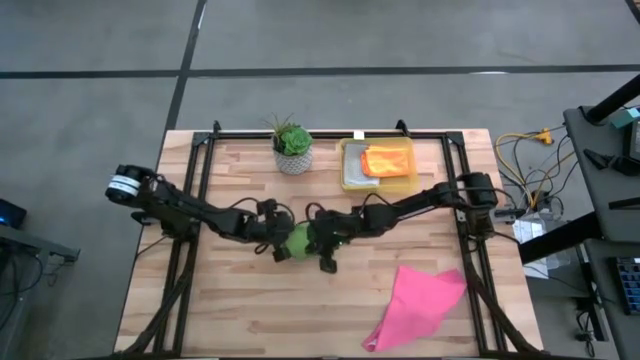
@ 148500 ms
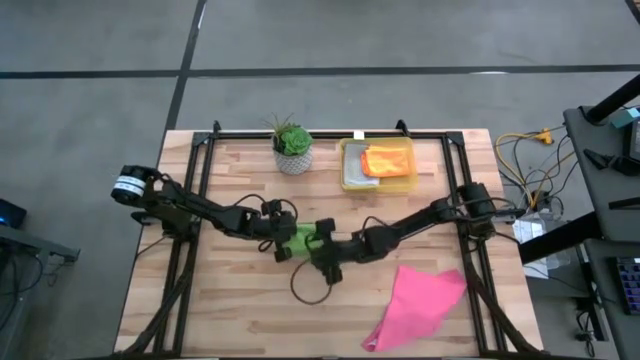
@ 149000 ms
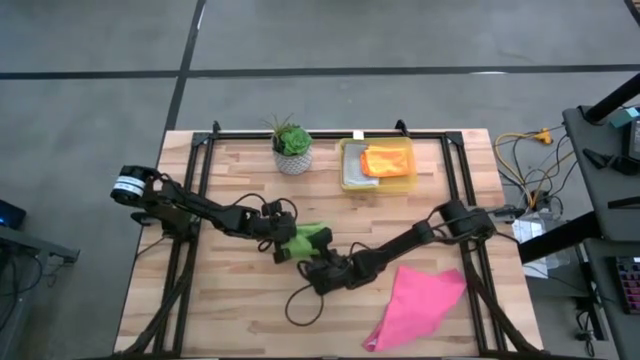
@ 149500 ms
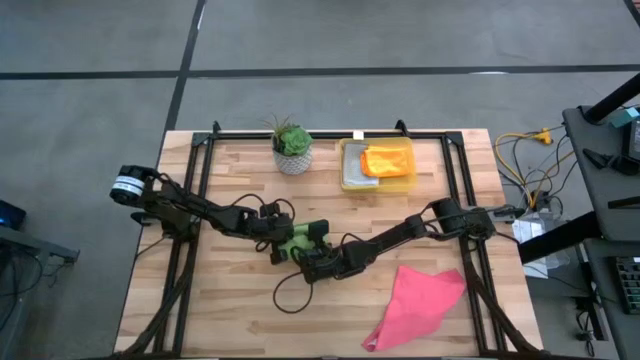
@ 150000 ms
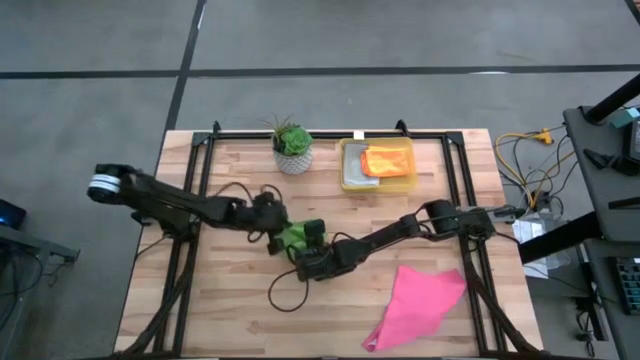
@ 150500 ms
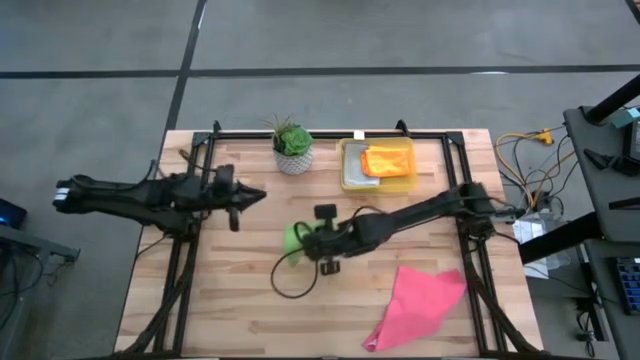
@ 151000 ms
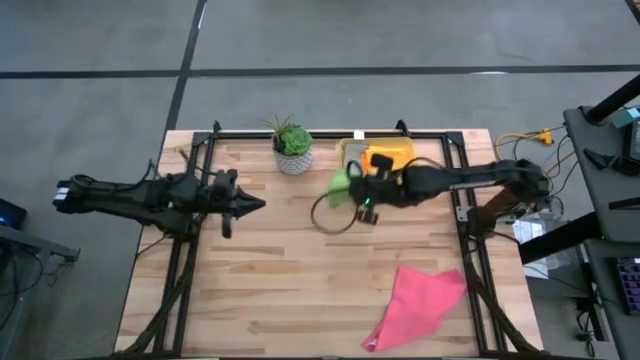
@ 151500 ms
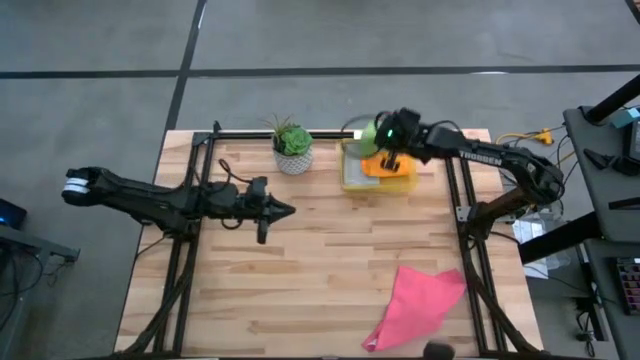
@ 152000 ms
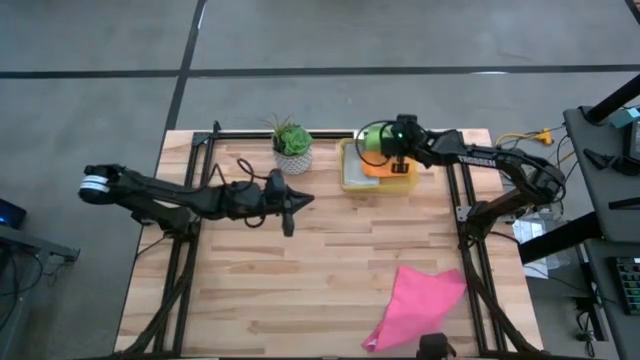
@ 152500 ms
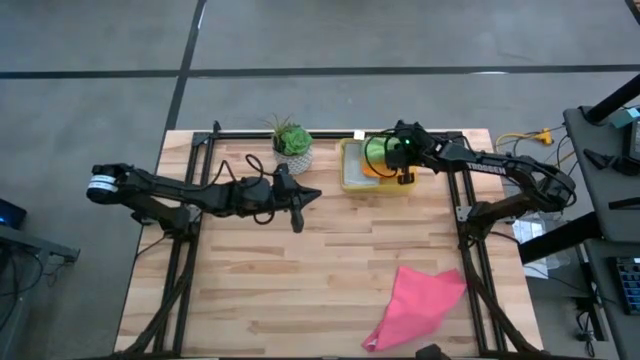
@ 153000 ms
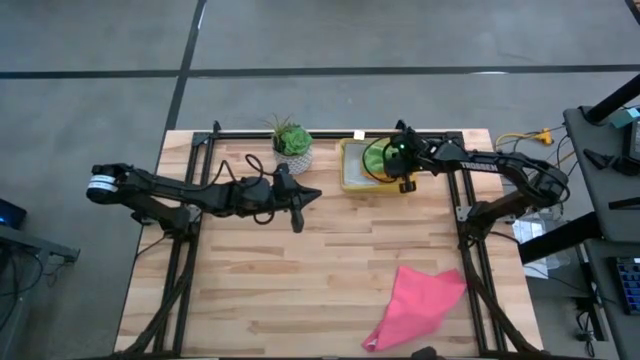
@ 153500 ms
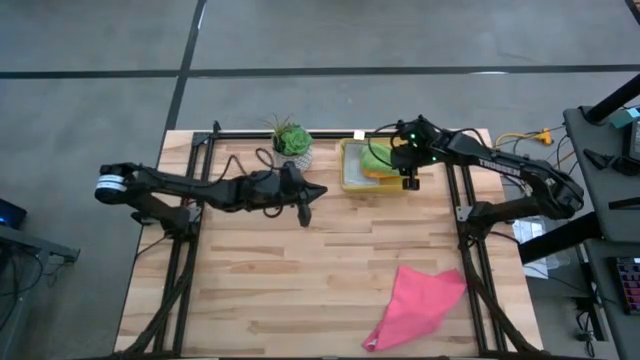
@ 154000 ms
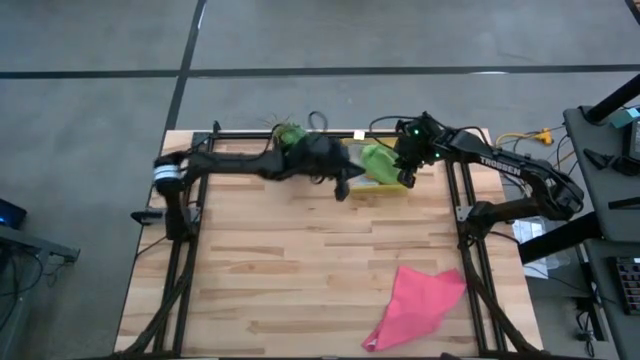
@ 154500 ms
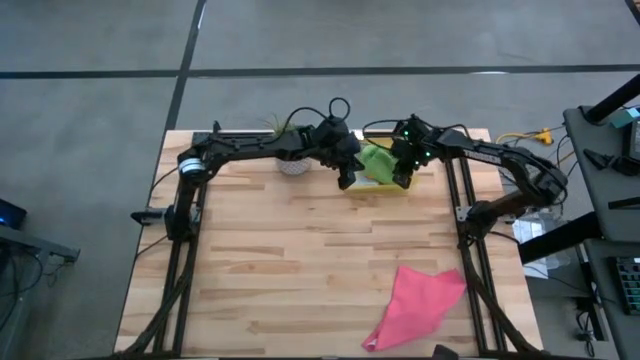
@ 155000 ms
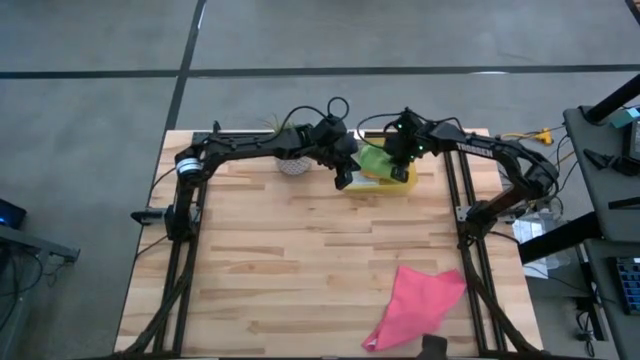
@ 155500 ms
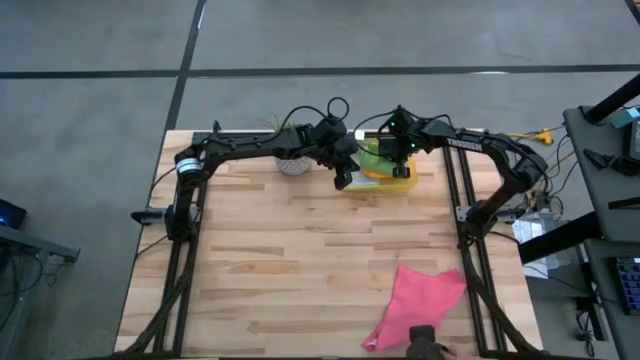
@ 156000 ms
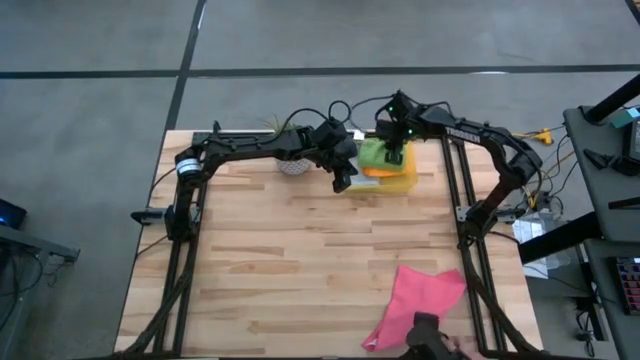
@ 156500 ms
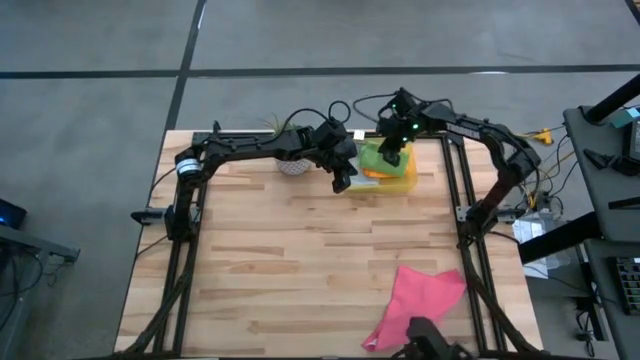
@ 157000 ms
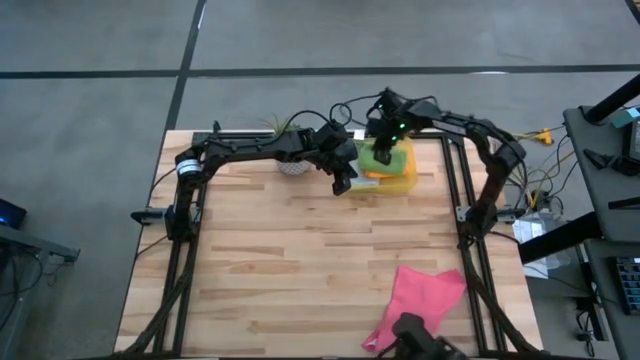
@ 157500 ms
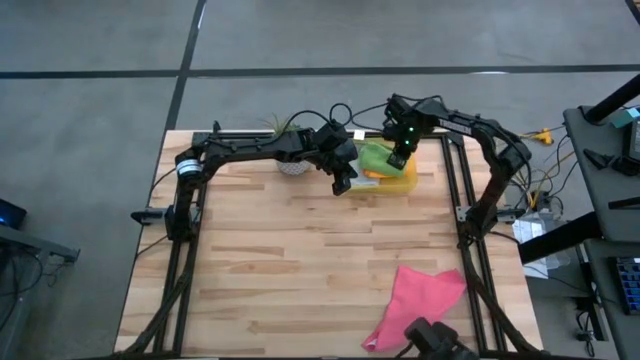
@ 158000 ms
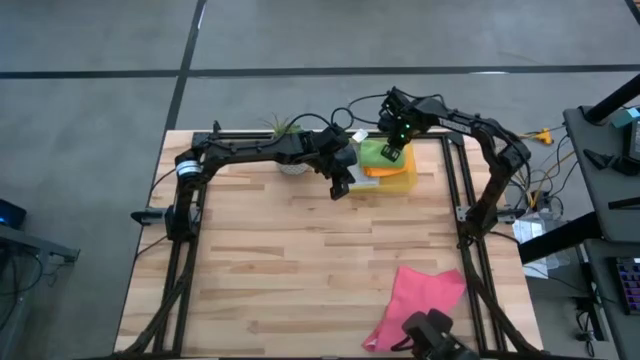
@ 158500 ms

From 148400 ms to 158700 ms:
Task: Fold microfiber towels
Put the green microfiber cloth into the yellow bin

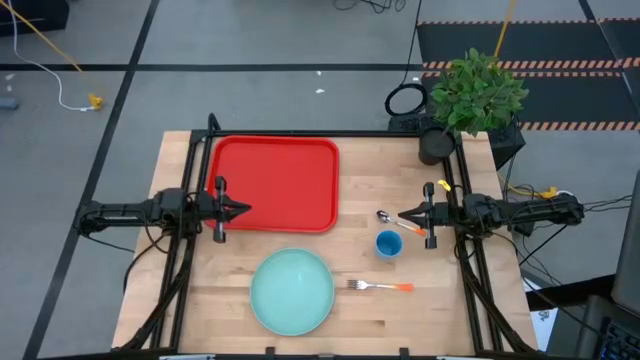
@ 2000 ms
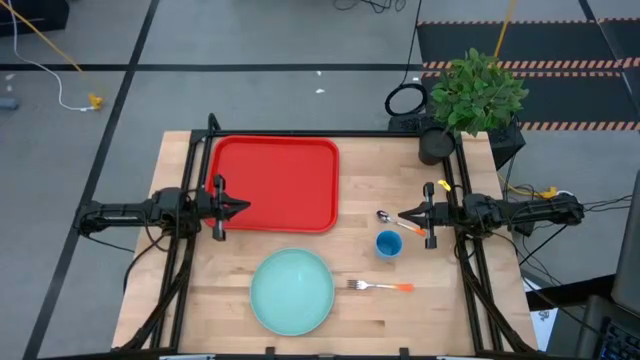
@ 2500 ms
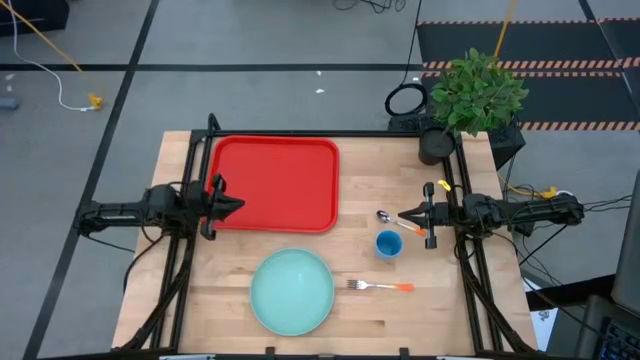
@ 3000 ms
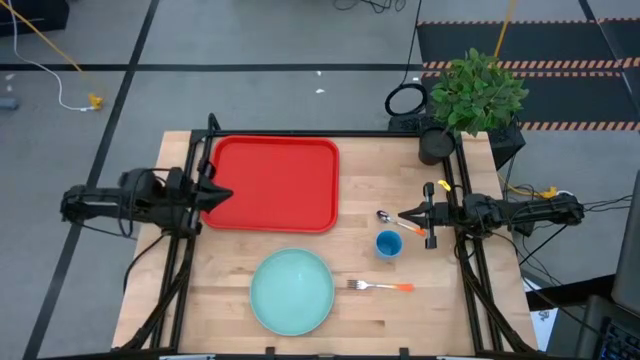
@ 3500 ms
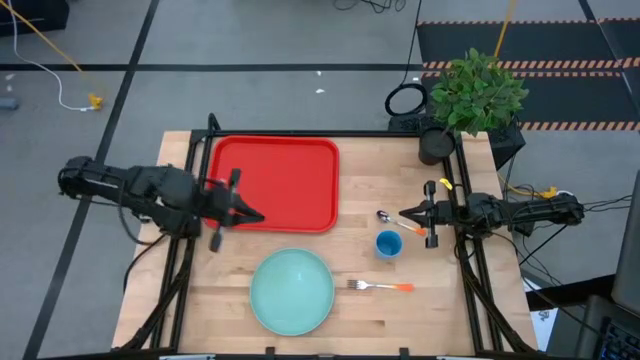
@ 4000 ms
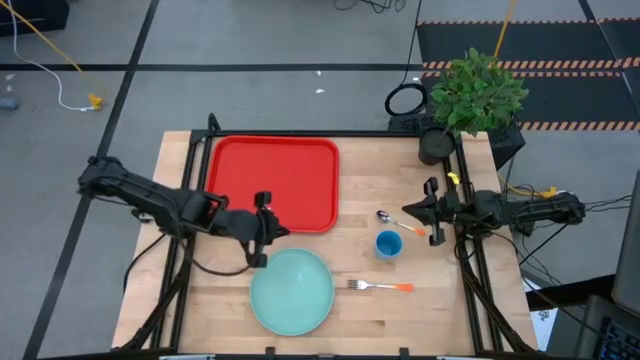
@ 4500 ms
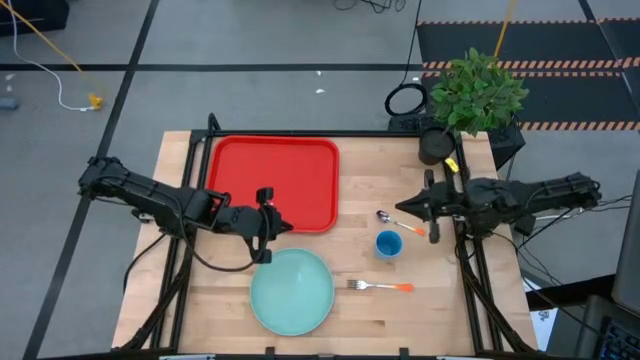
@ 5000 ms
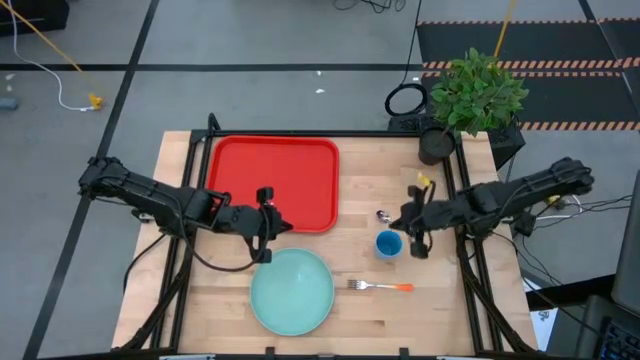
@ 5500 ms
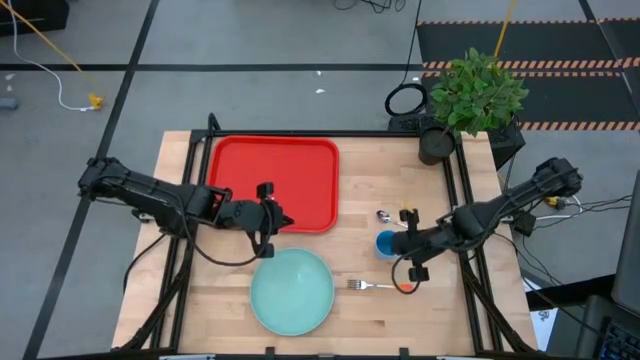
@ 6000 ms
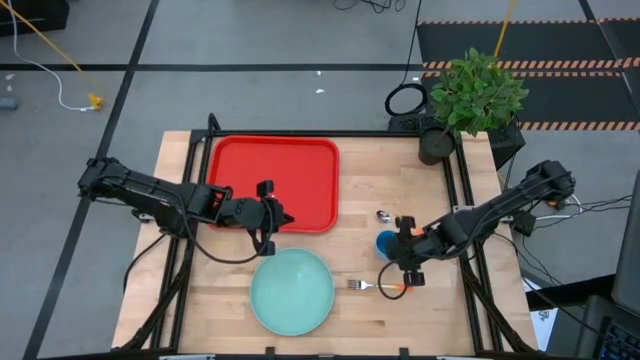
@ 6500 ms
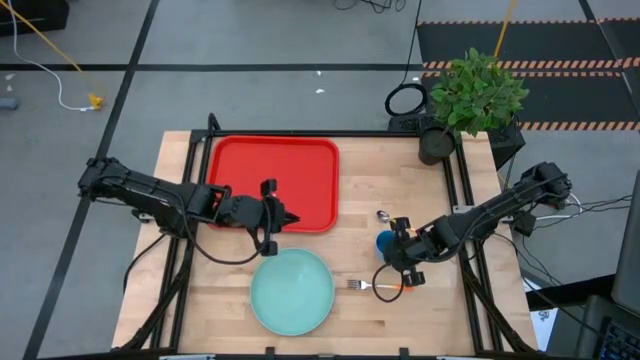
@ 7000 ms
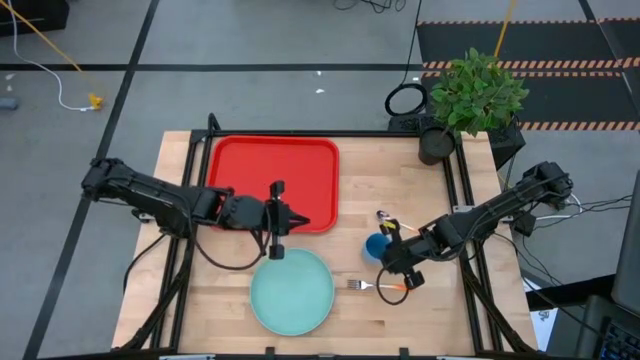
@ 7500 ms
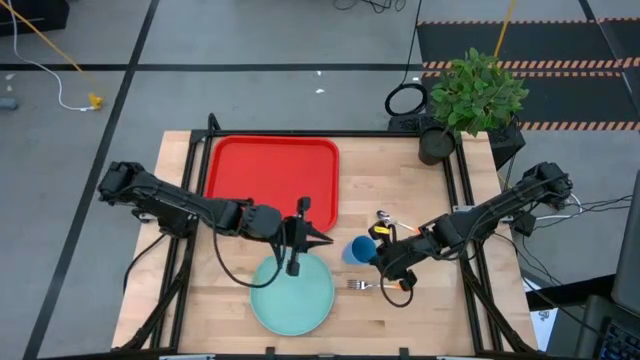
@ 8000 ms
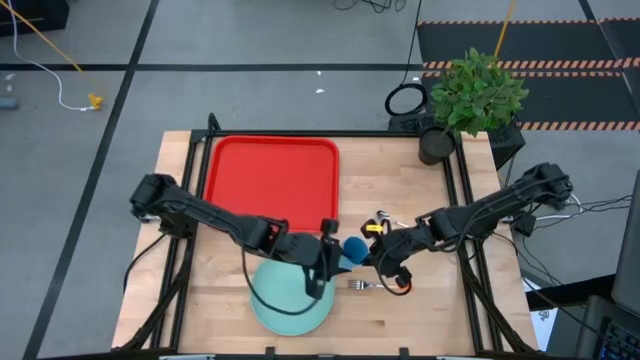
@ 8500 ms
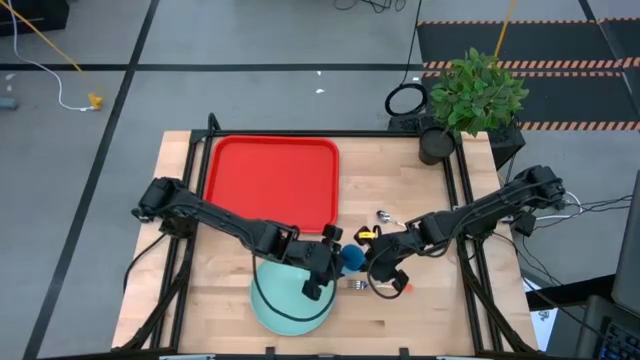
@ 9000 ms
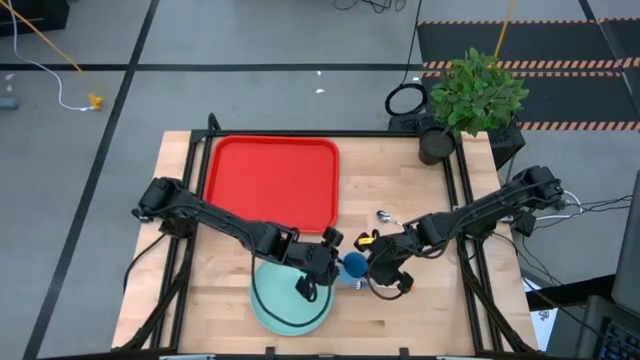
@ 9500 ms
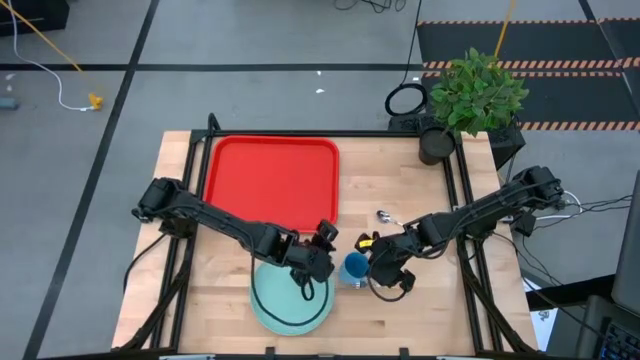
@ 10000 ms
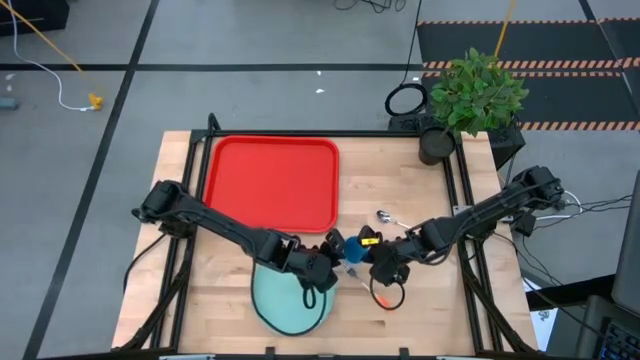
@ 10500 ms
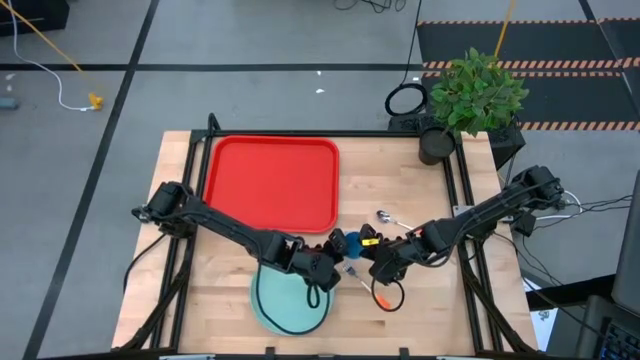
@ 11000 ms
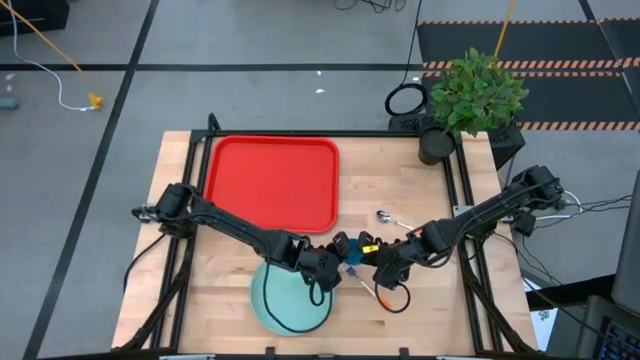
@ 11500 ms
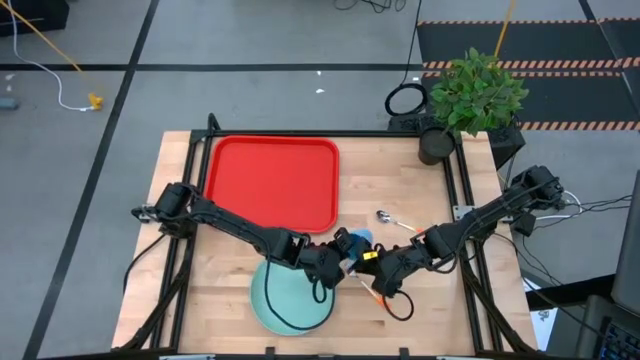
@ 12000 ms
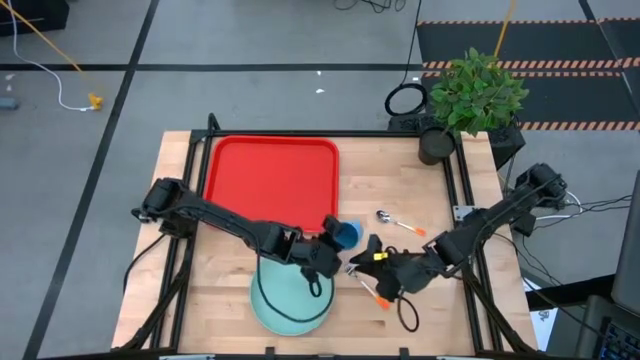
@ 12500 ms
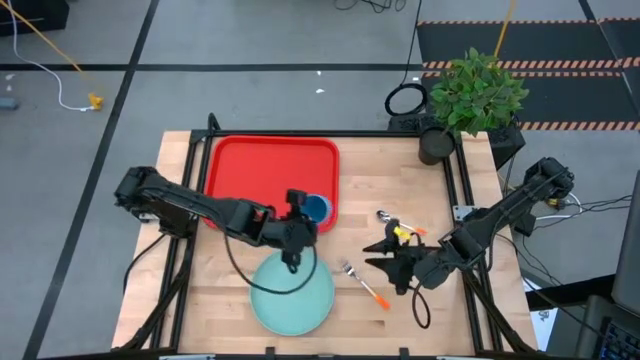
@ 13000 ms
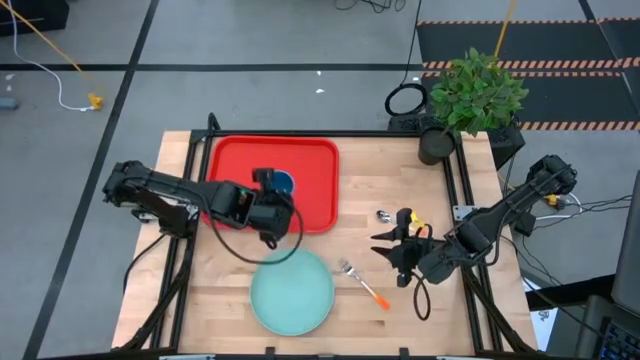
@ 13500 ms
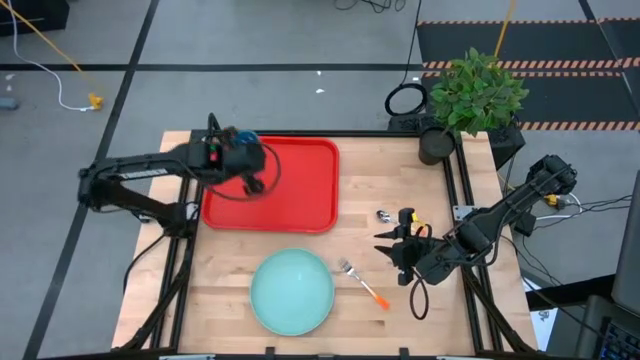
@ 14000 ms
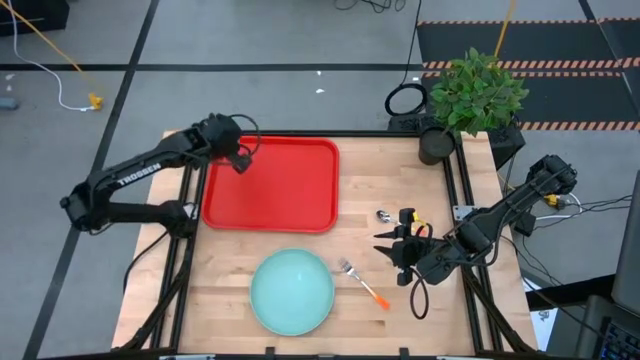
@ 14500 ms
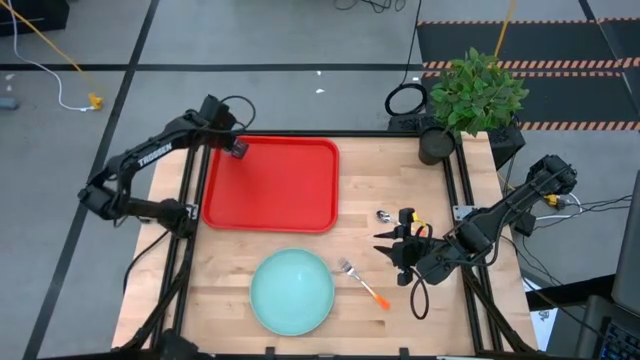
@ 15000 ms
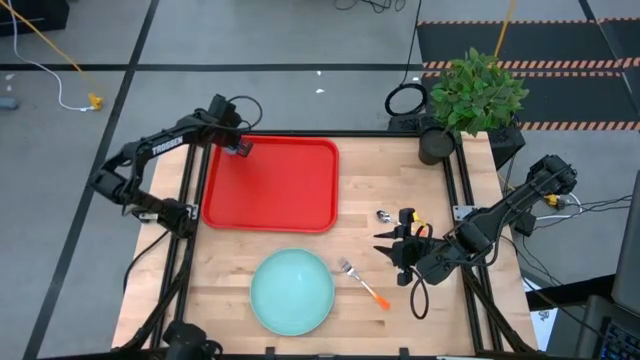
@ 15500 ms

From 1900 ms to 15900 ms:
Task: Pick and place plate/cup/fork/spoon on tray
Put the blue cup on the red serving tray
